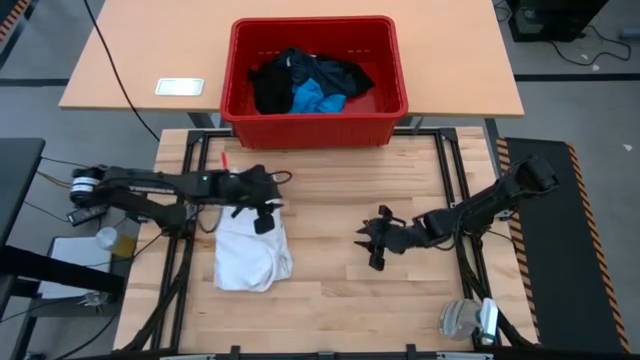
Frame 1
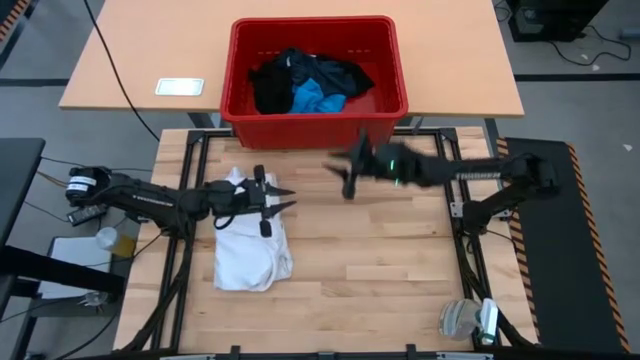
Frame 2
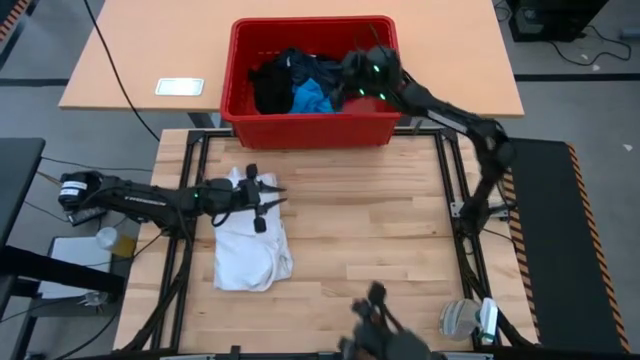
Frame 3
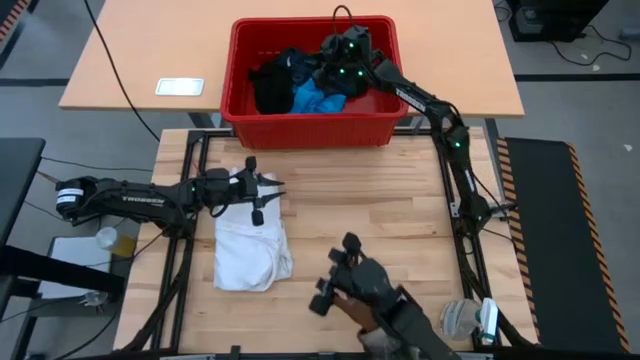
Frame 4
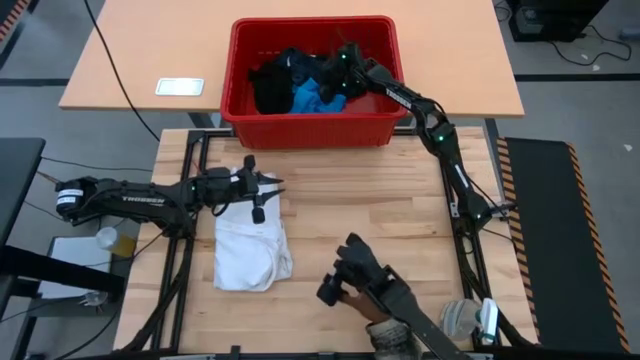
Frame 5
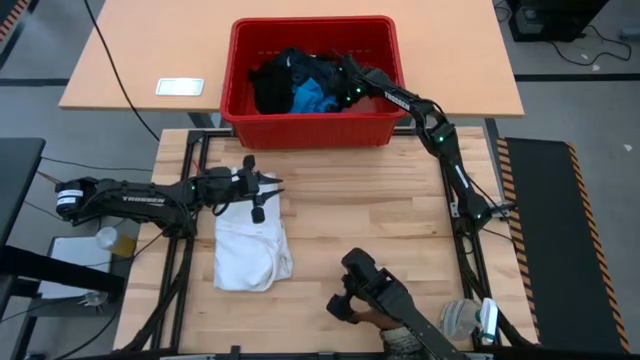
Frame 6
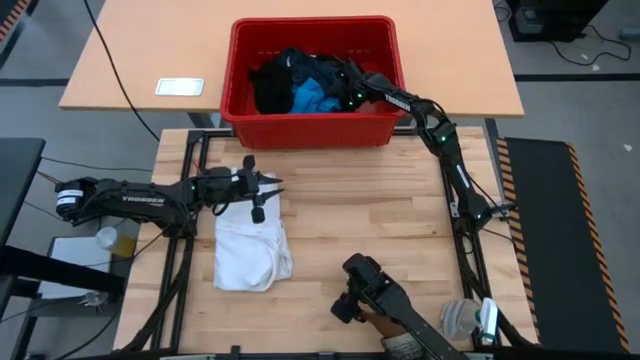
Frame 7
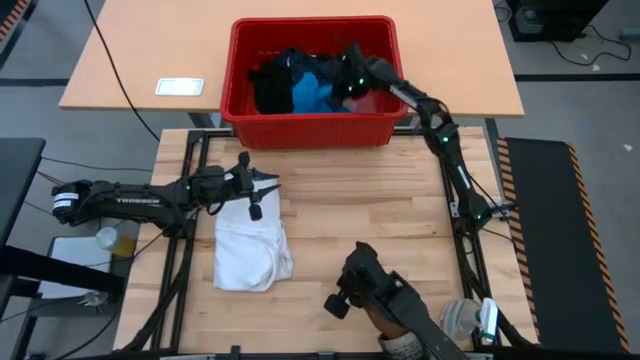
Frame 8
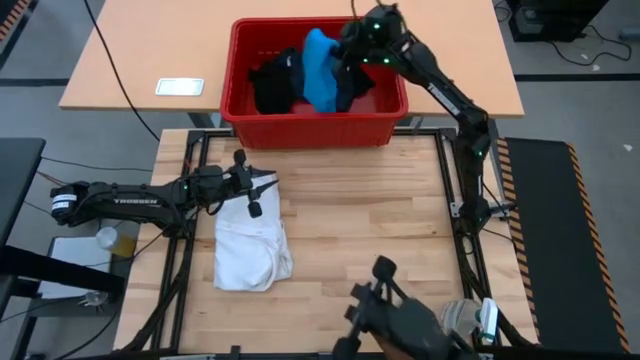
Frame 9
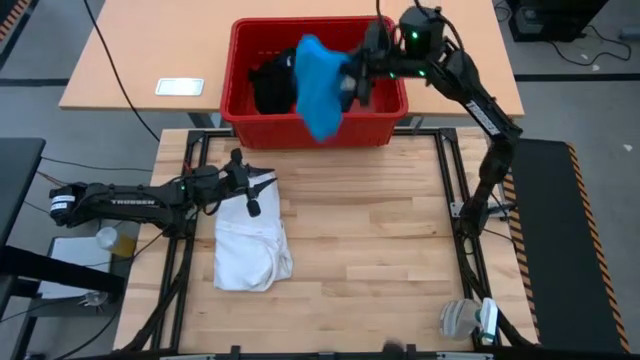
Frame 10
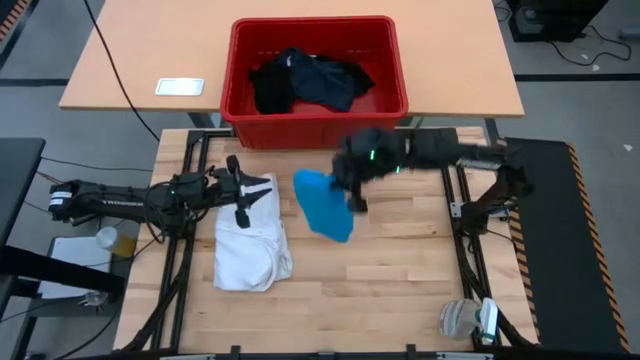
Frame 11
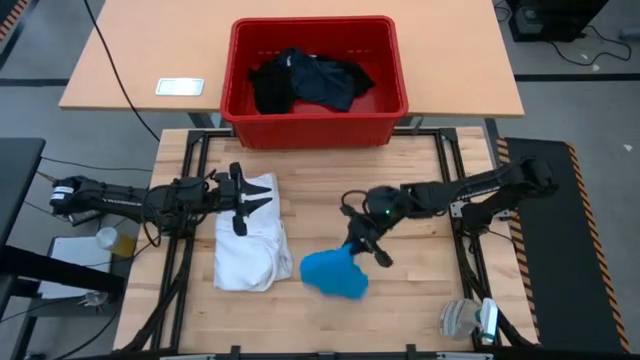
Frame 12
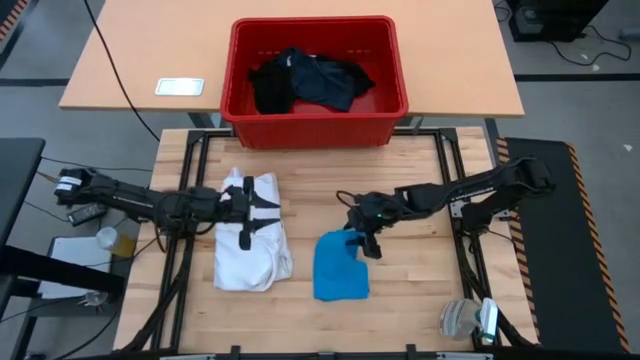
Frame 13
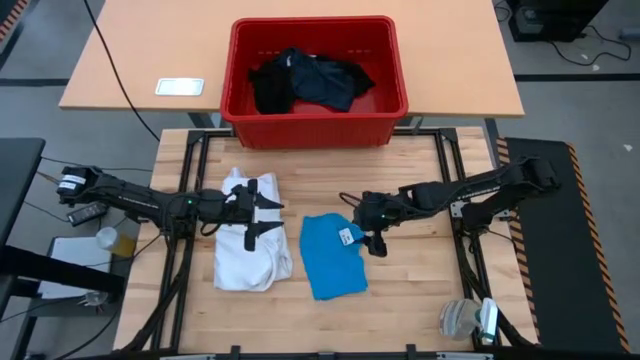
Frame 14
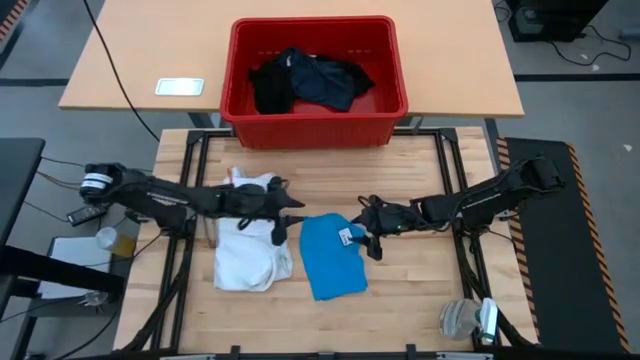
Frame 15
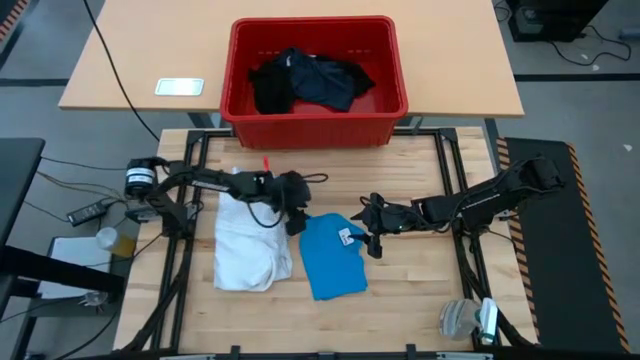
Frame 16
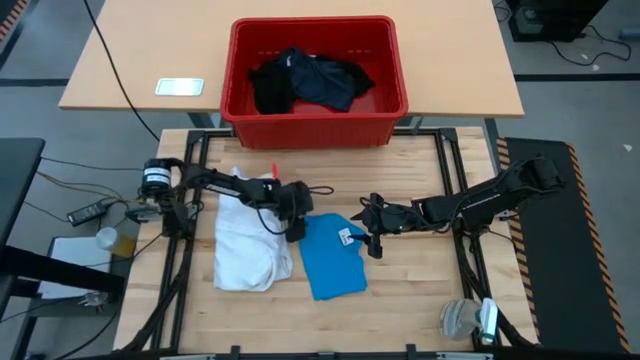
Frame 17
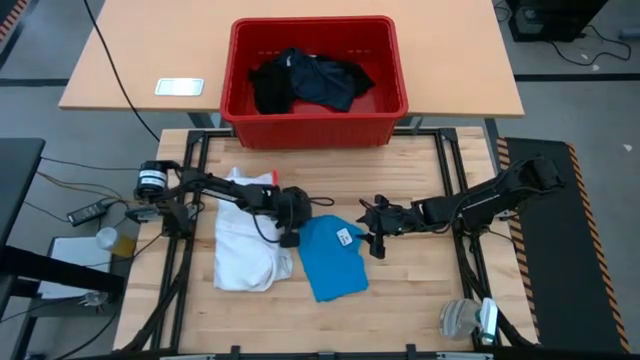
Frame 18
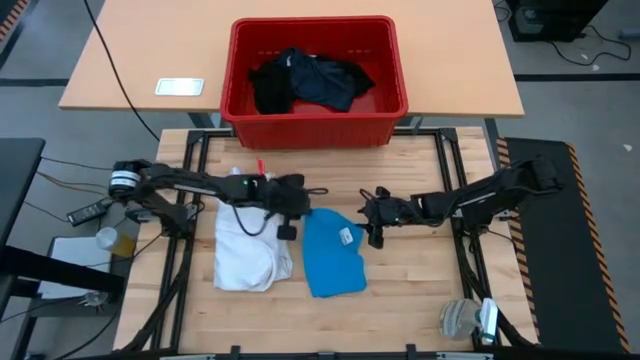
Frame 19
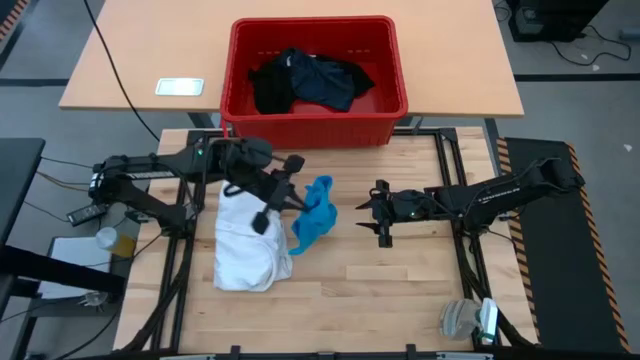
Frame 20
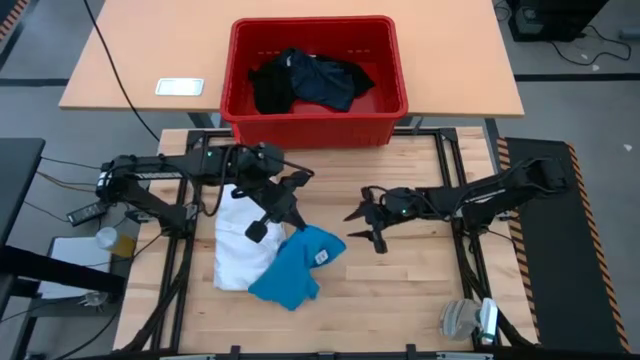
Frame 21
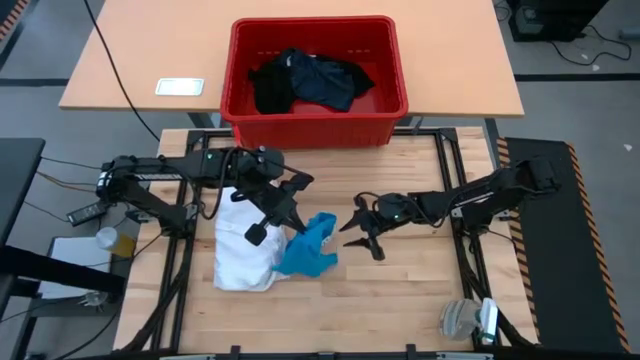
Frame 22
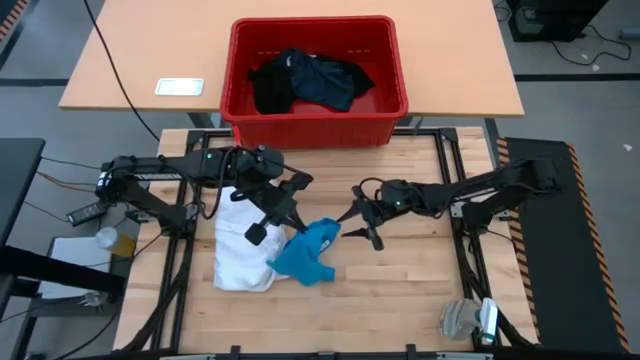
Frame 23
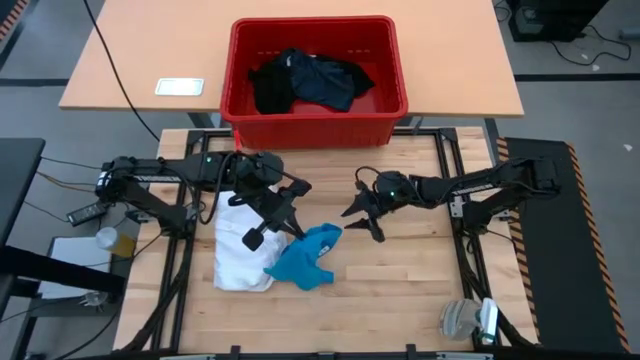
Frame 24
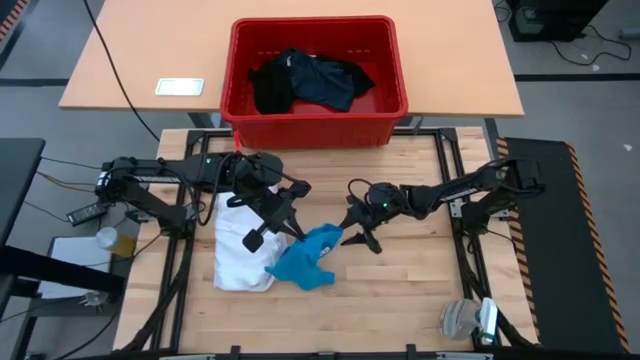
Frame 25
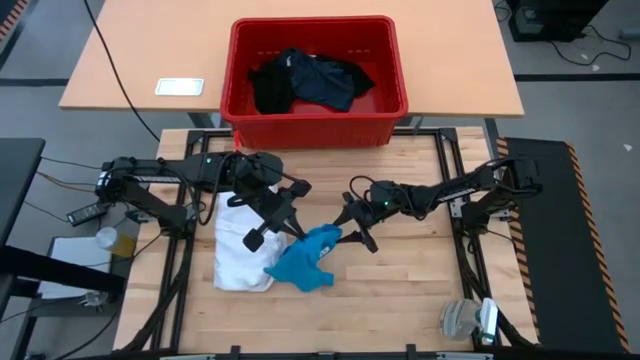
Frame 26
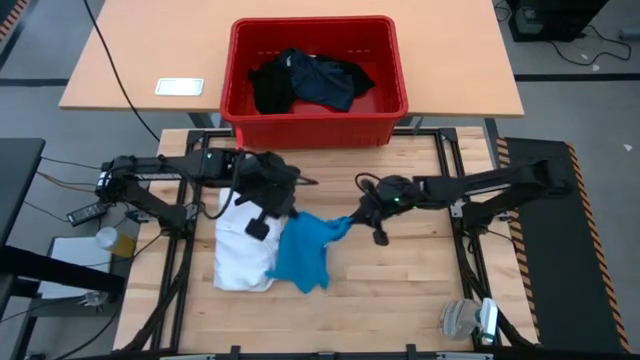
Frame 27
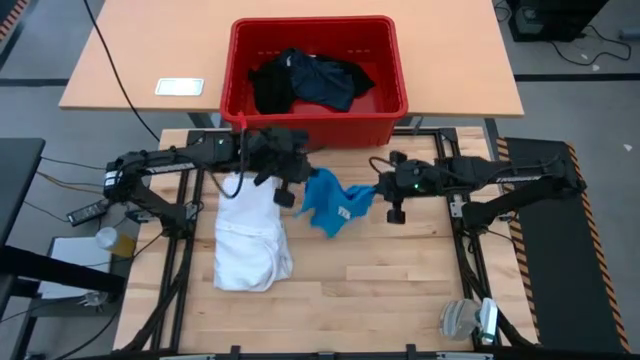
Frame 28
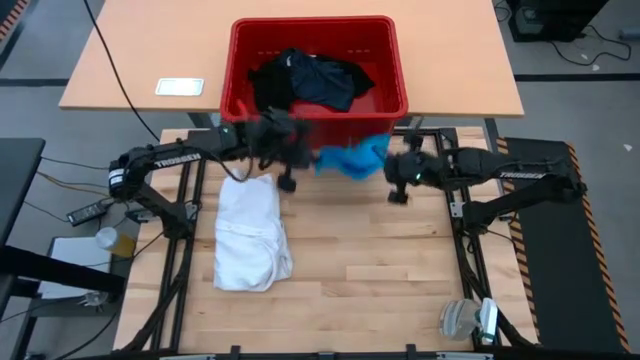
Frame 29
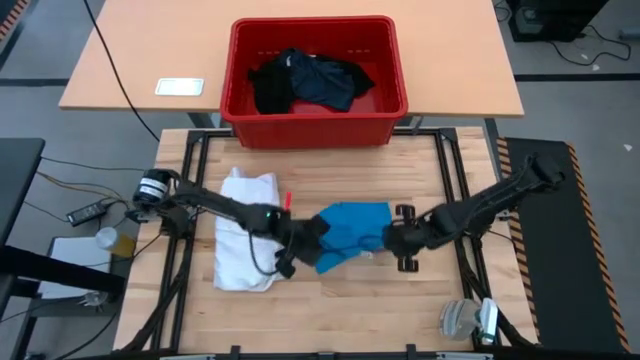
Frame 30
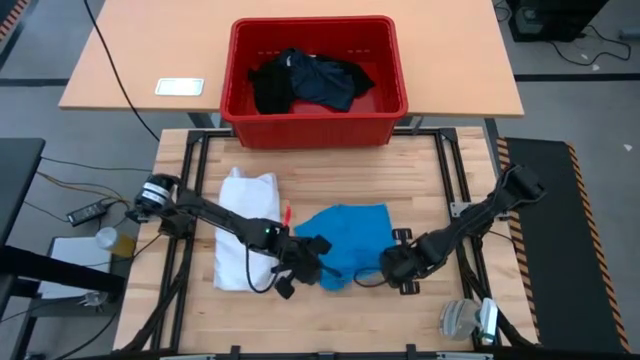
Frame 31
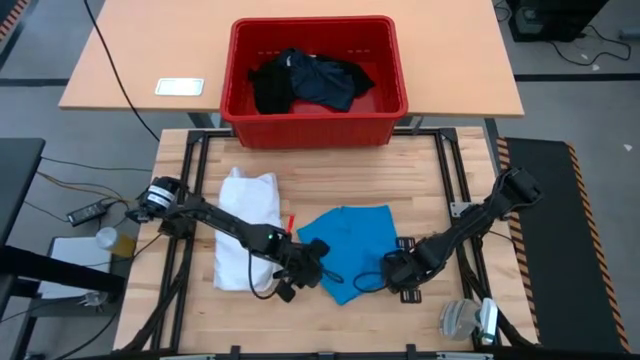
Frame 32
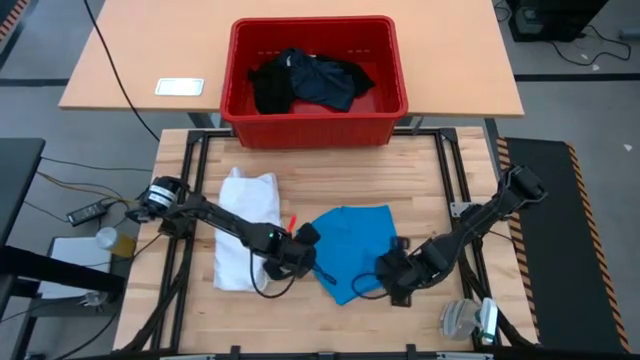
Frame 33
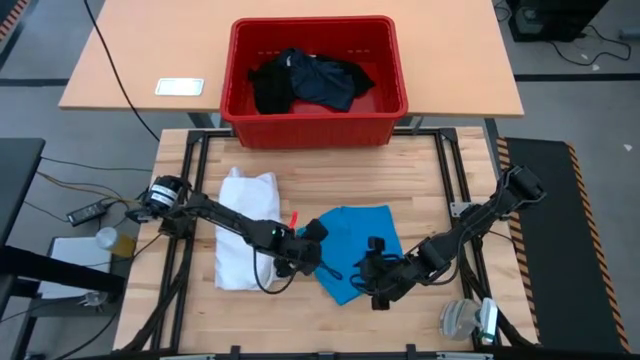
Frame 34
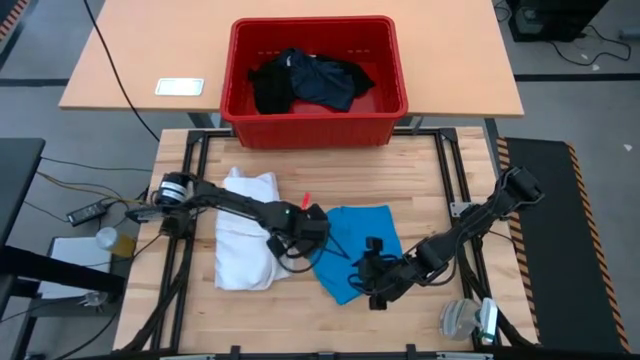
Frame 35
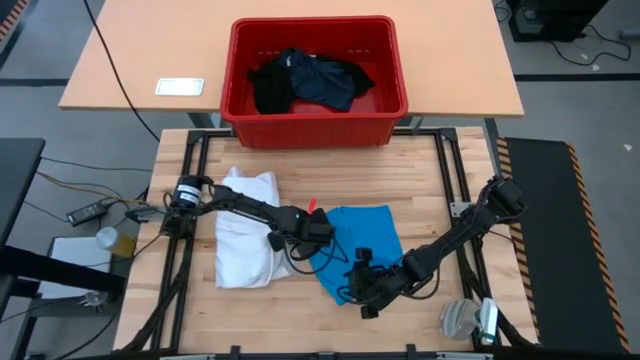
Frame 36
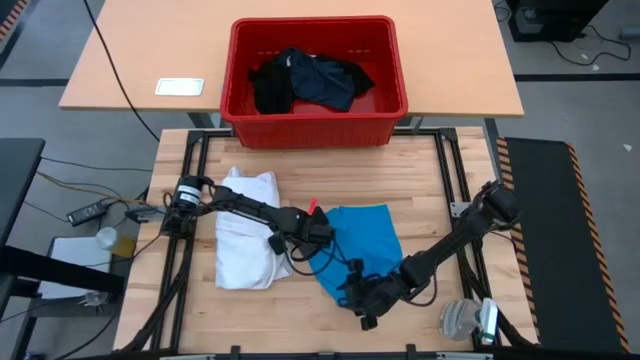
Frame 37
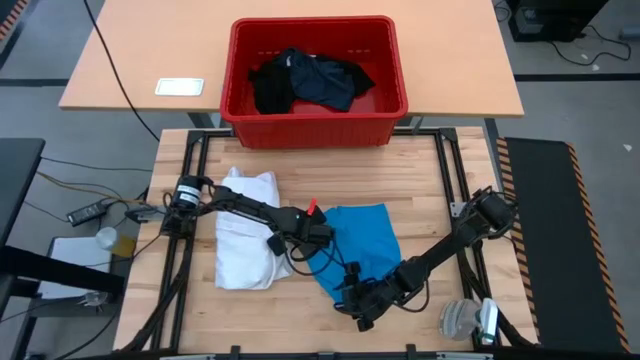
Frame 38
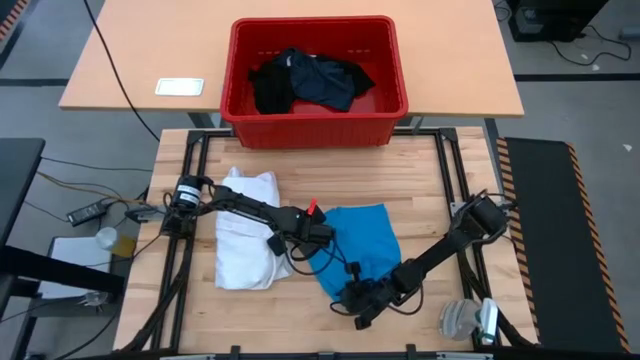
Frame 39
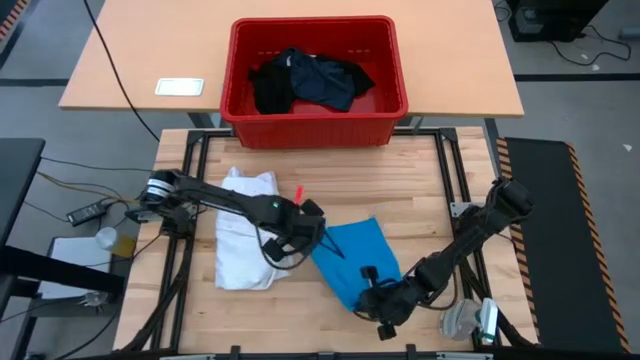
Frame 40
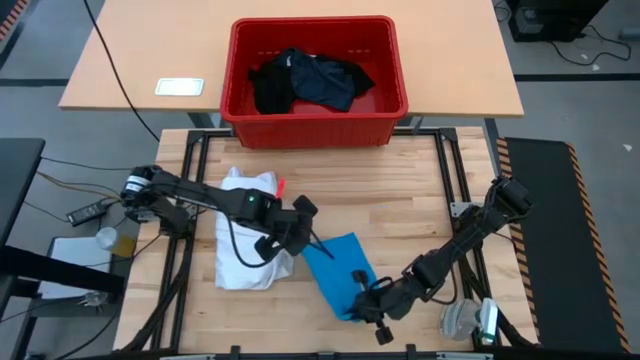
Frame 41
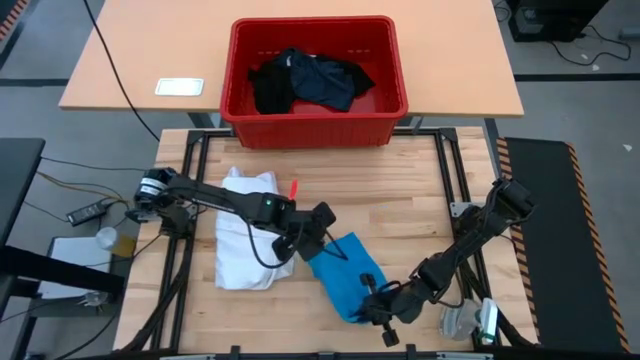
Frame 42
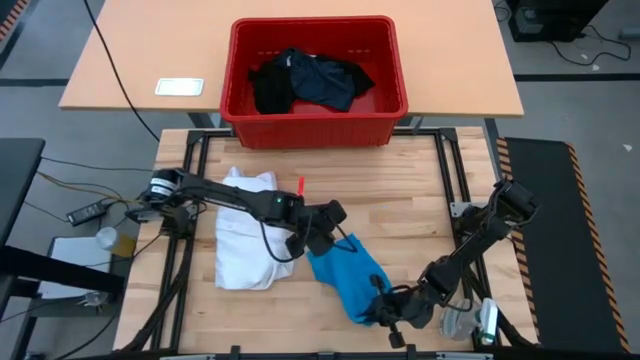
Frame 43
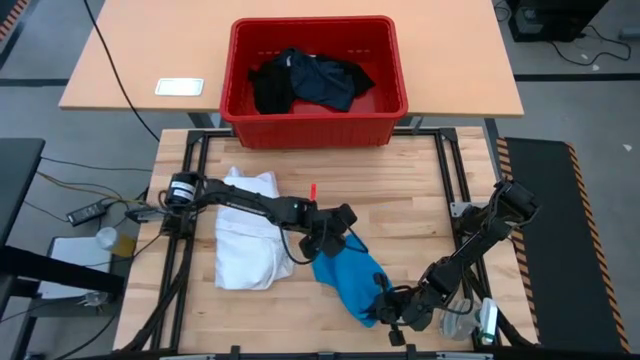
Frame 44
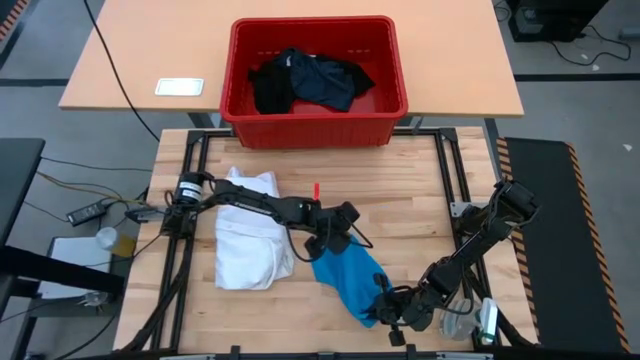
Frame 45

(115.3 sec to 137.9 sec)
Task: Fold laundry
Fold the blue underwear

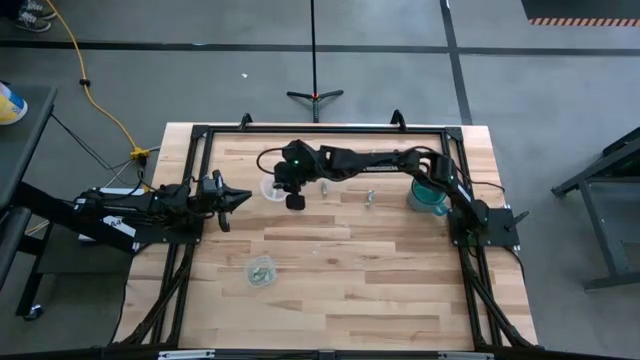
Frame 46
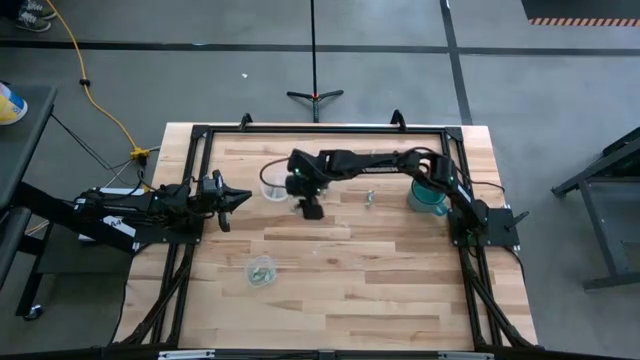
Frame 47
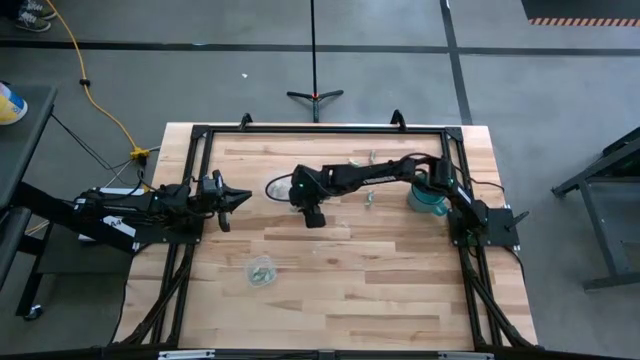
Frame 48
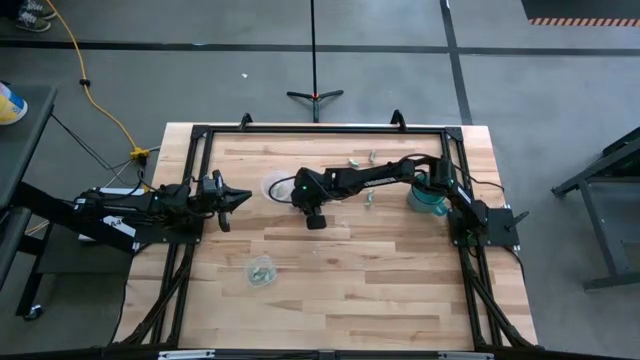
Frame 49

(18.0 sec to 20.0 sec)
Task: Pick and place items into bin
Put the white stevia packet into the top transparent bin
